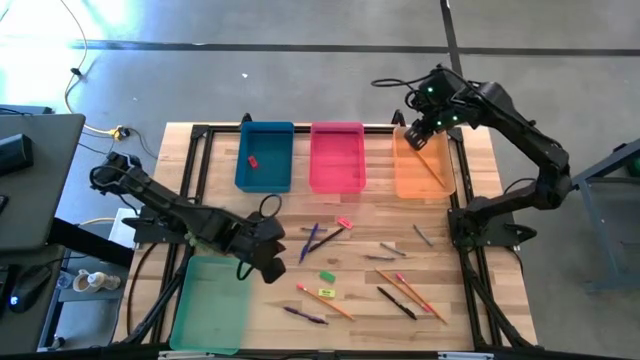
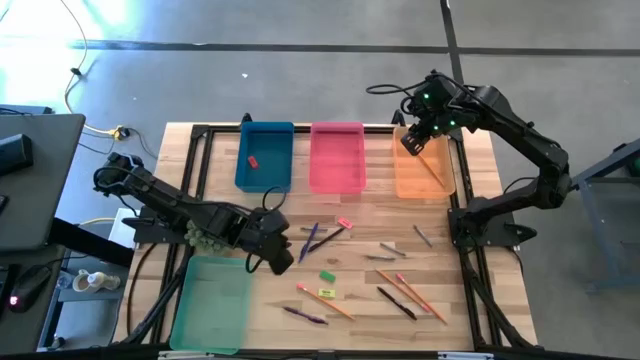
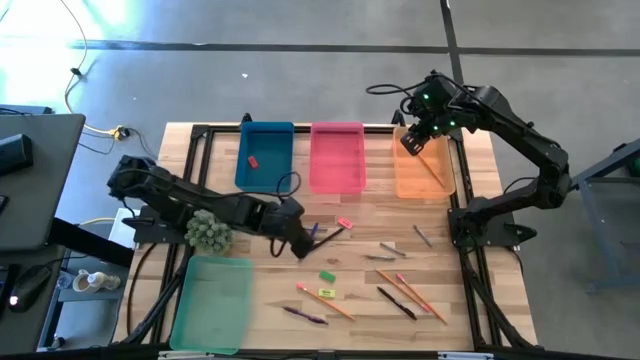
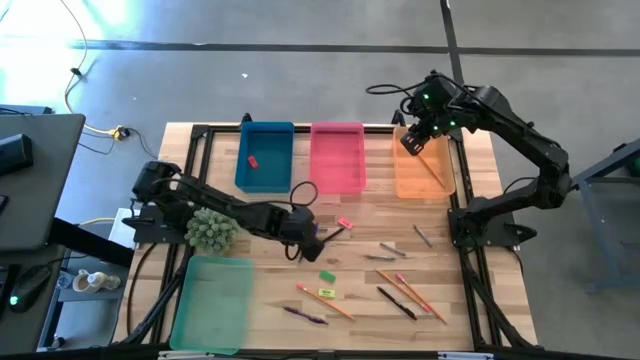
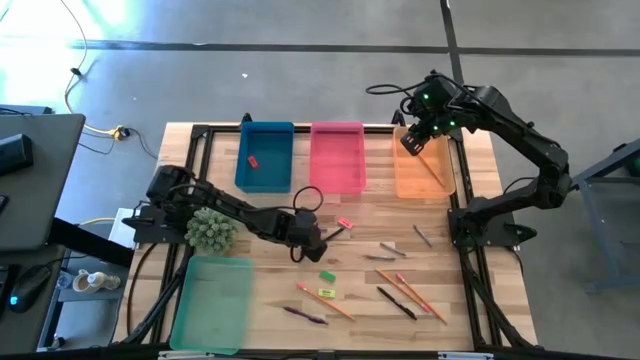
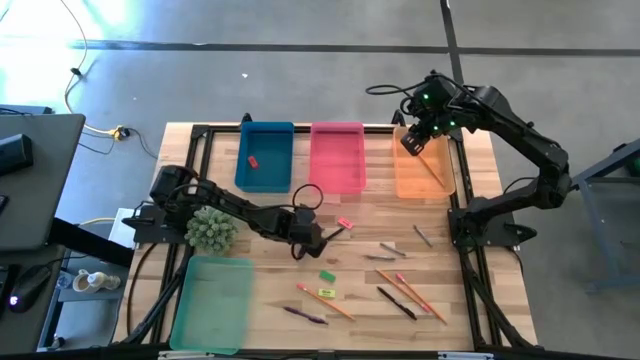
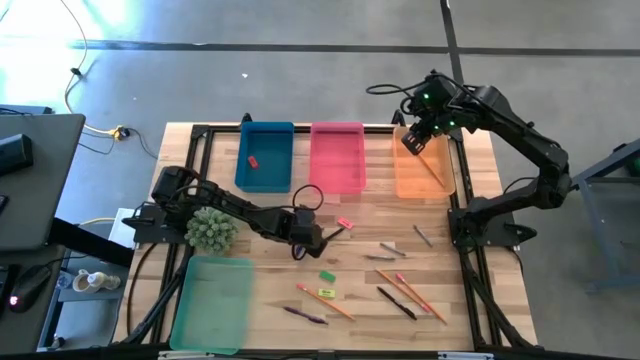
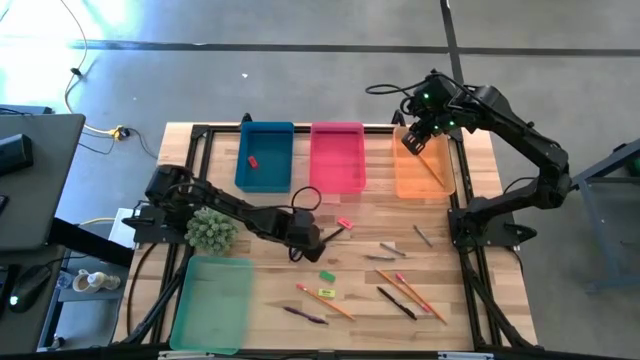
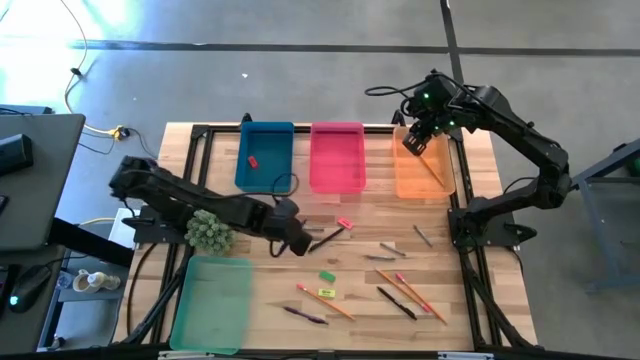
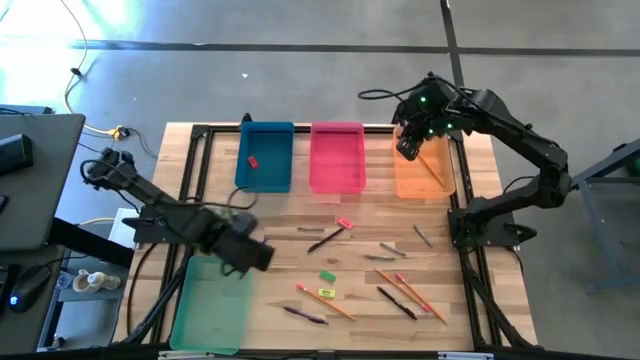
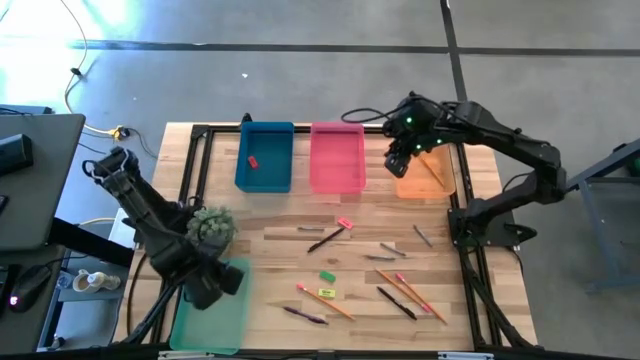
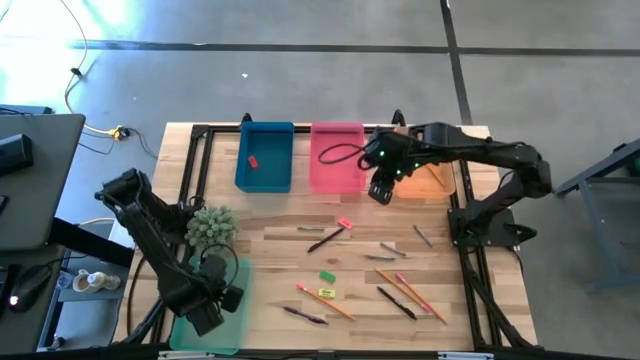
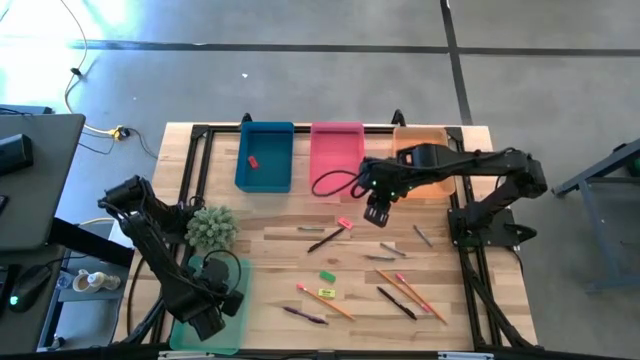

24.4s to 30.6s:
Task: Sort crayons/erasers/pens/pencils in bins
Put the blue pen into the blue bin

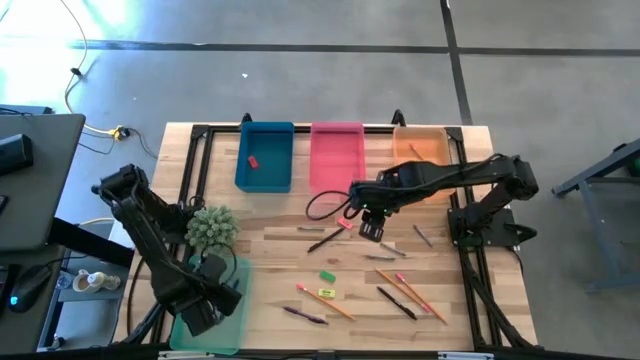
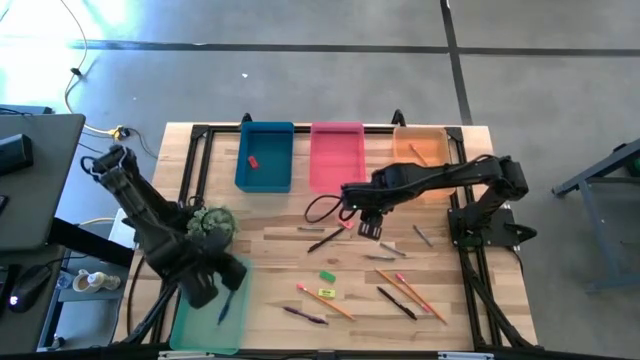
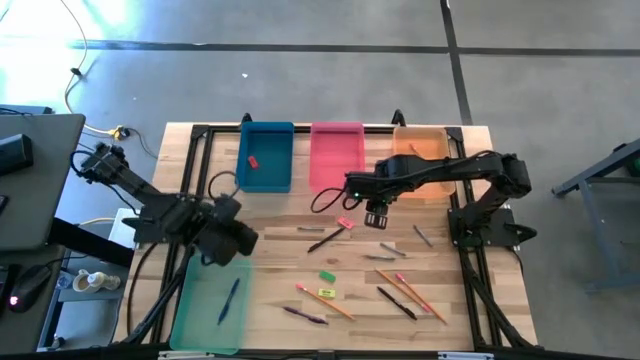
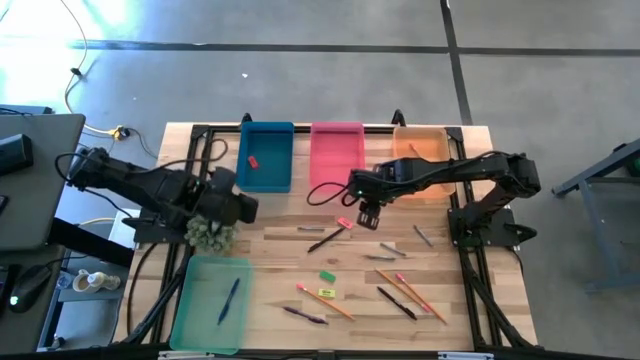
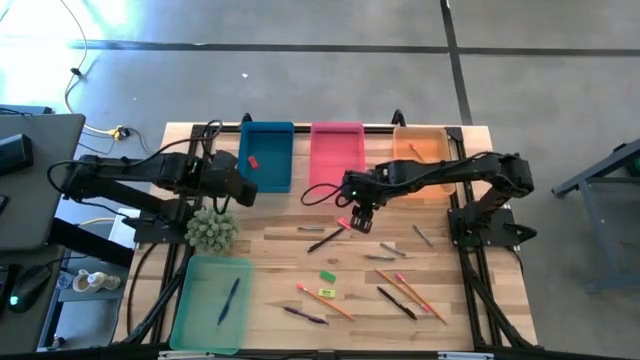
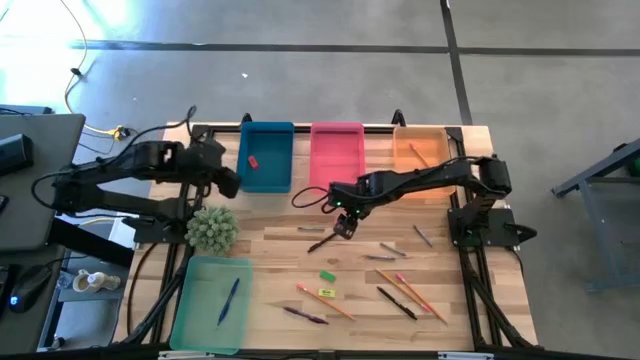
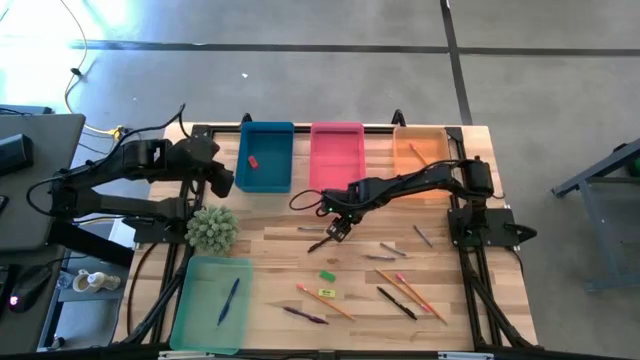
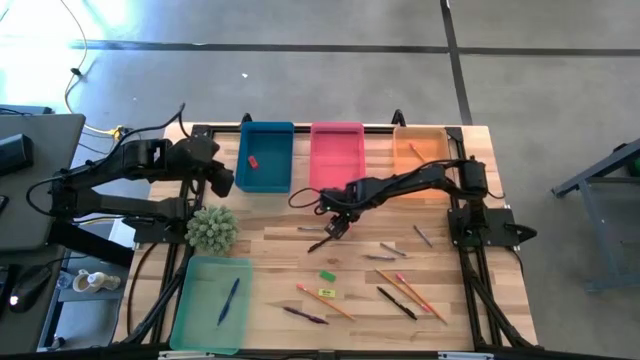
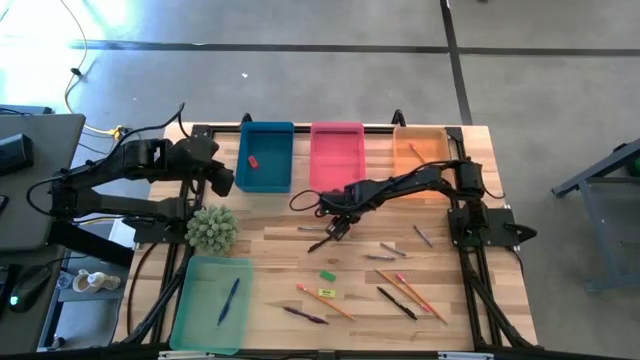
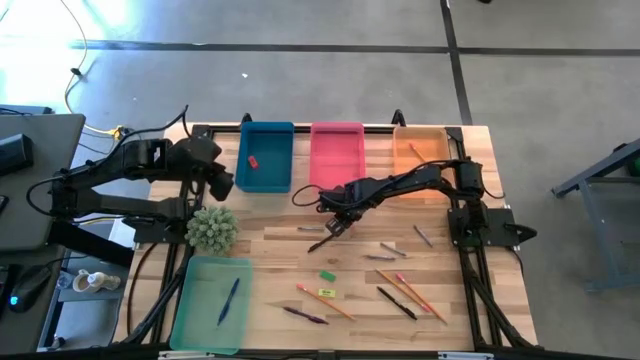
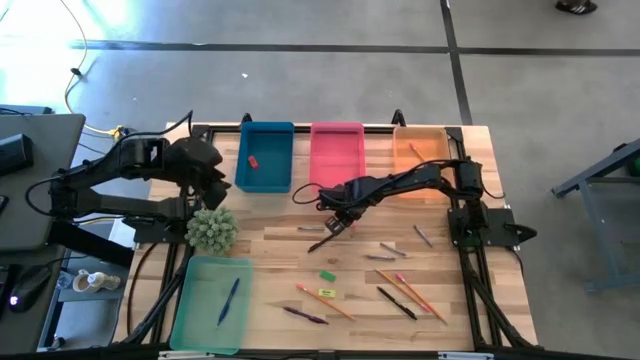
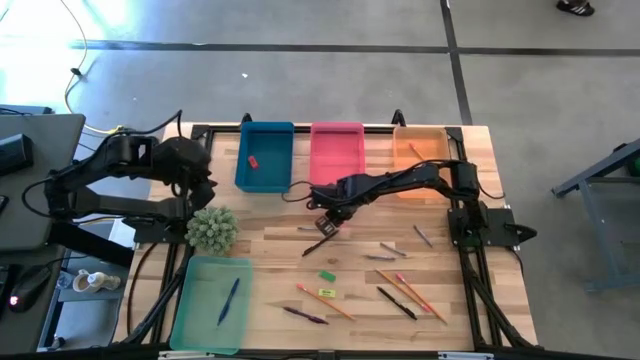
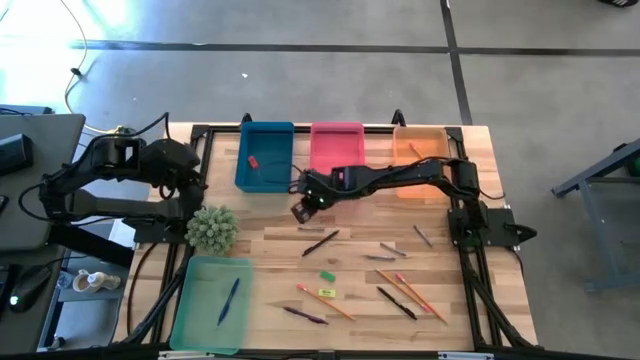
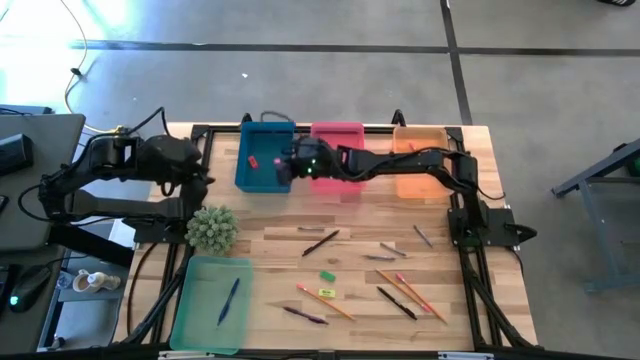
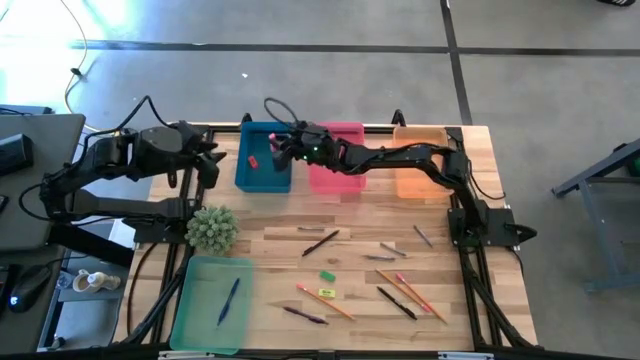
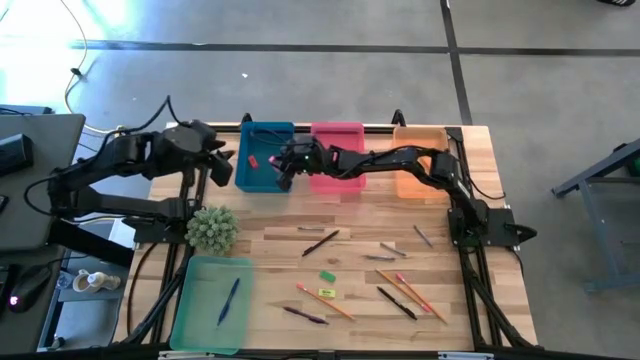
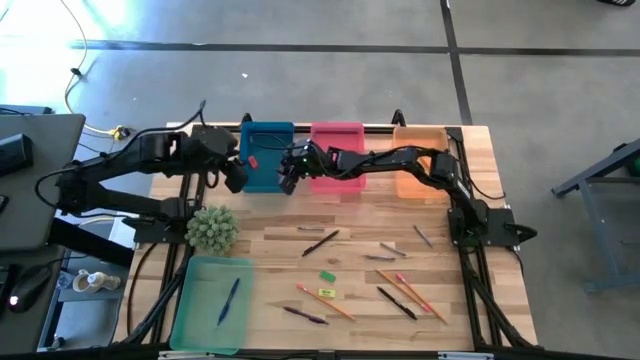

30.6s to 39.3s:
Put the pink eraser into the blue bin

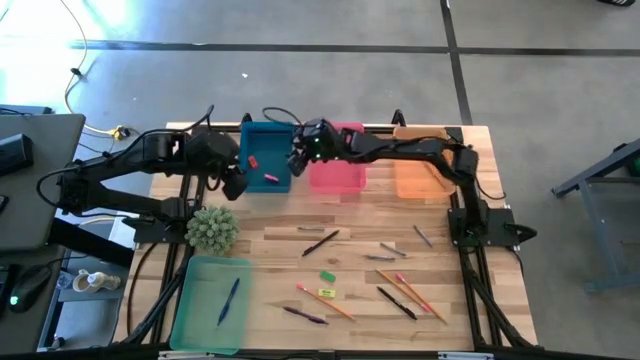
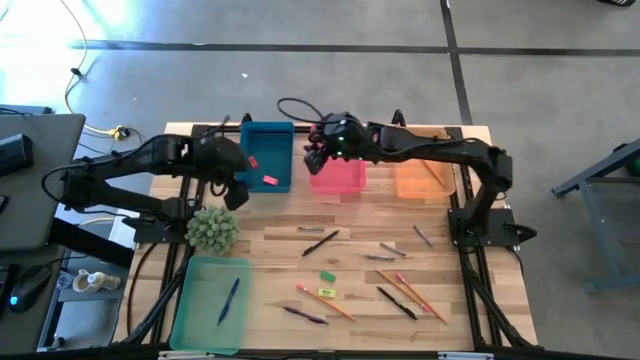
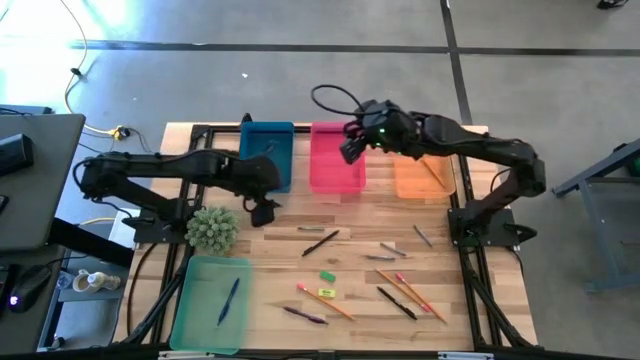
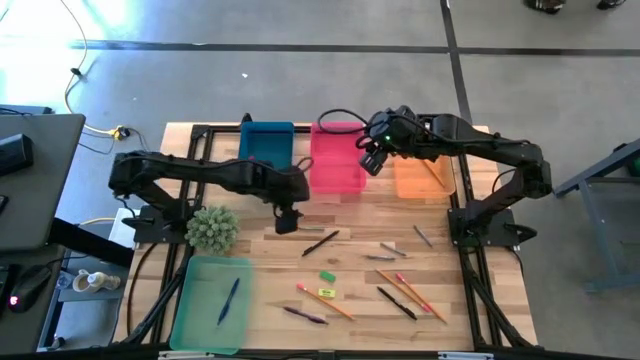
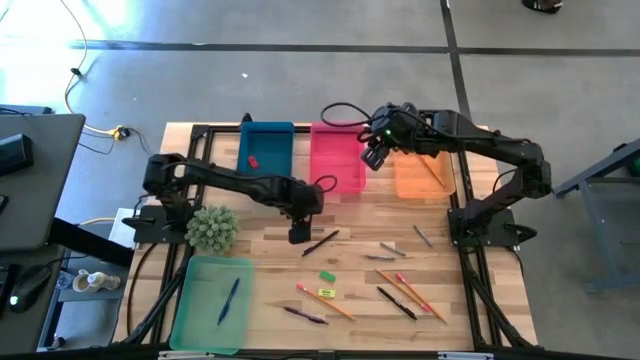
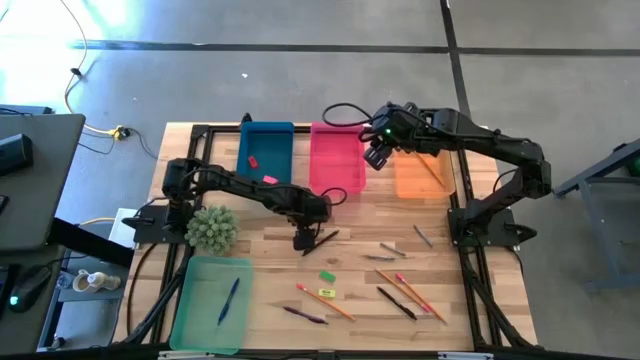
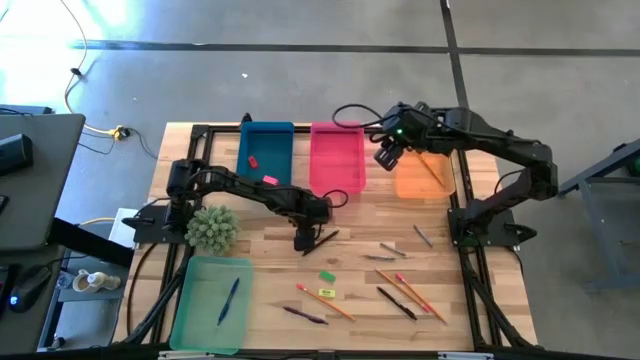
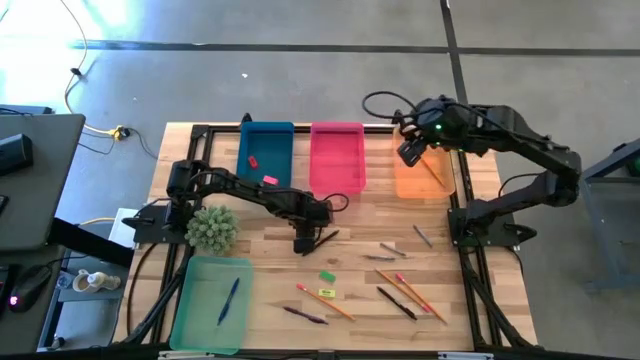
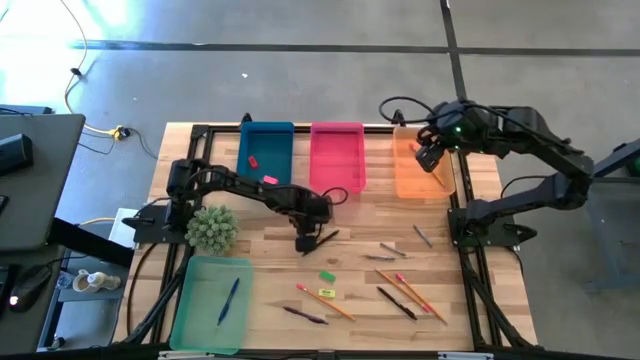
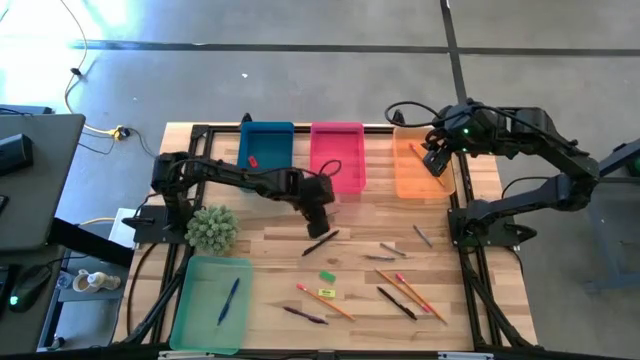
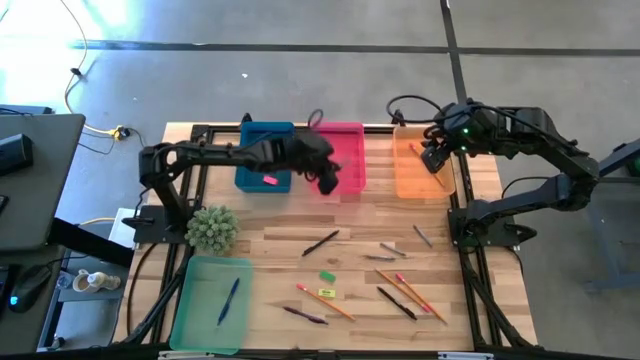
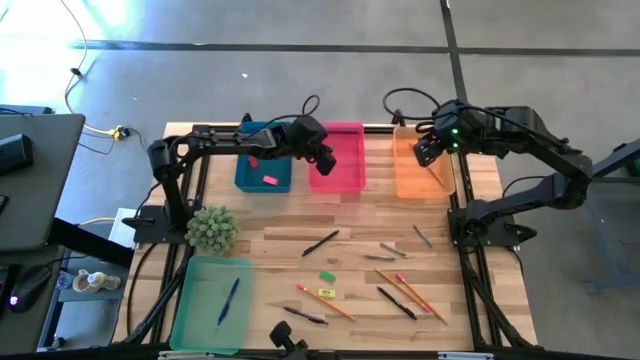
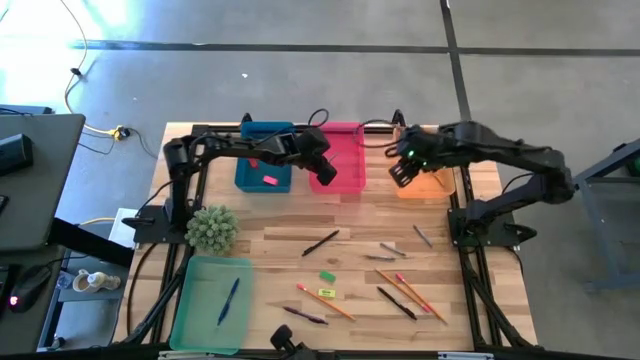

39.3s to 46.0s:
Put the gray crayon into the pink bin
